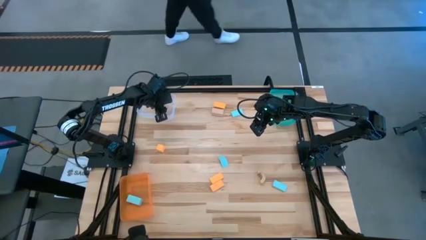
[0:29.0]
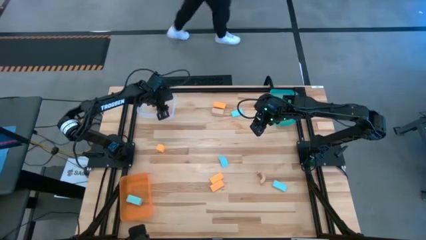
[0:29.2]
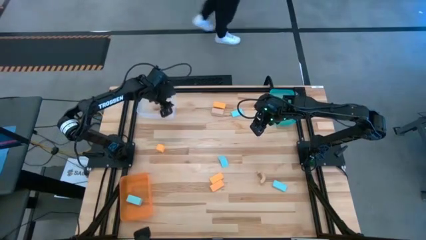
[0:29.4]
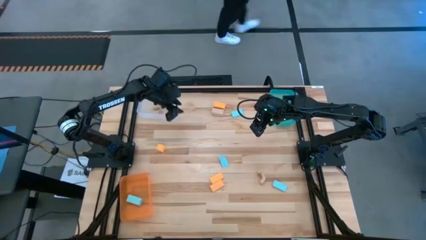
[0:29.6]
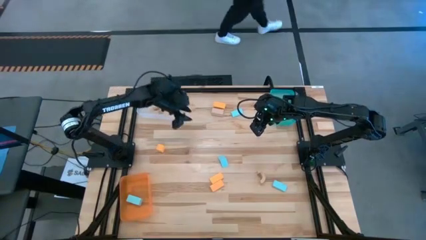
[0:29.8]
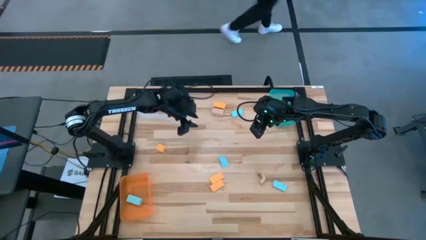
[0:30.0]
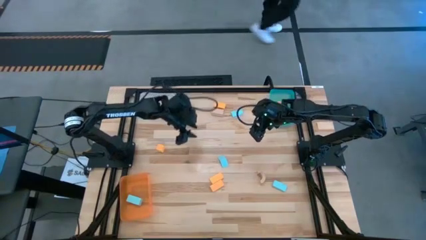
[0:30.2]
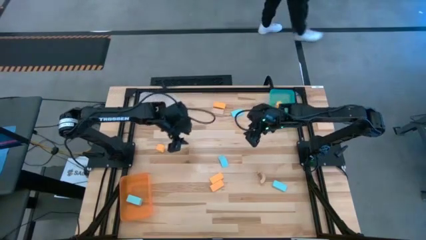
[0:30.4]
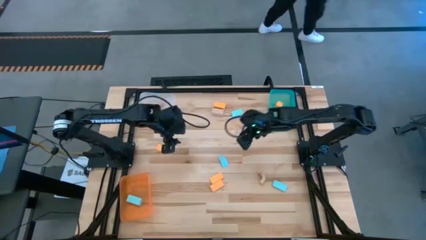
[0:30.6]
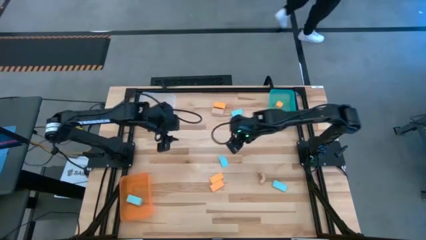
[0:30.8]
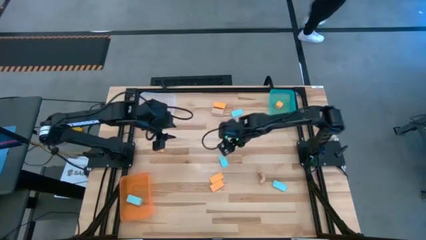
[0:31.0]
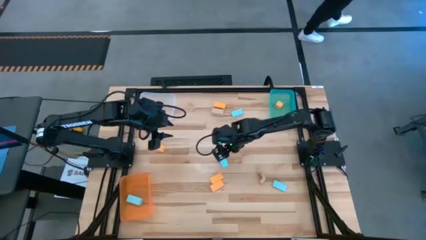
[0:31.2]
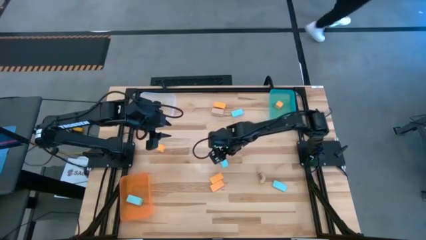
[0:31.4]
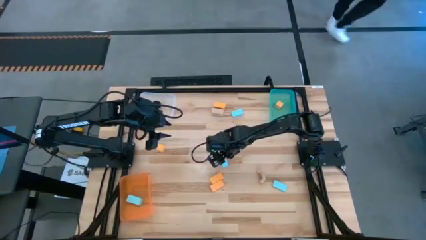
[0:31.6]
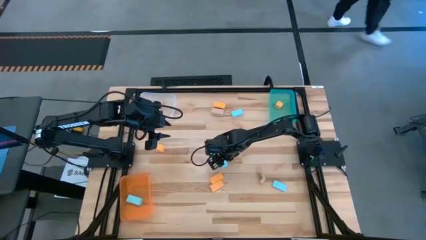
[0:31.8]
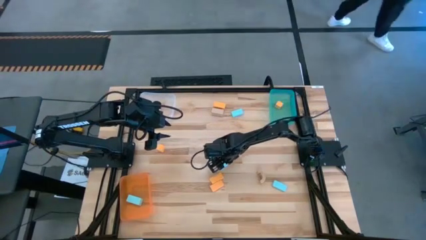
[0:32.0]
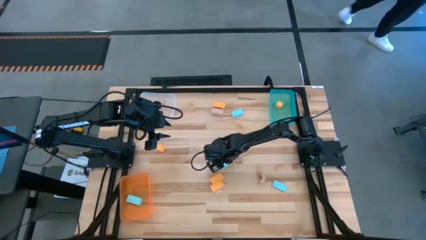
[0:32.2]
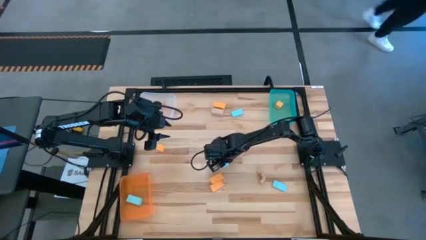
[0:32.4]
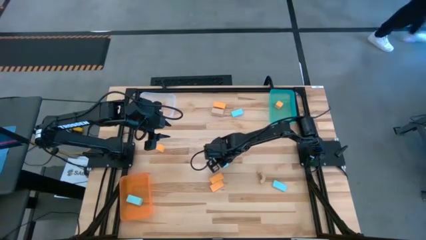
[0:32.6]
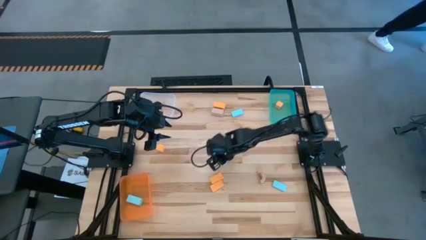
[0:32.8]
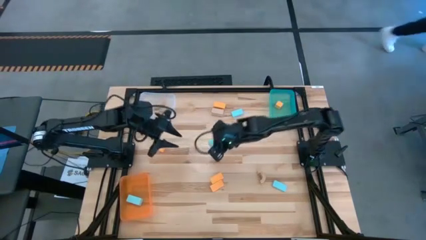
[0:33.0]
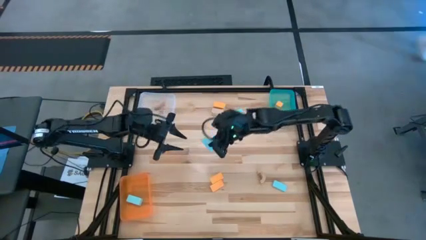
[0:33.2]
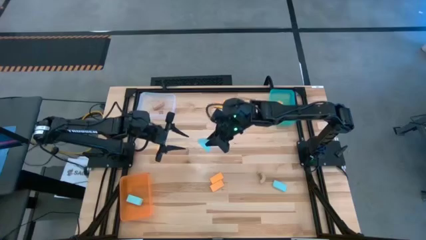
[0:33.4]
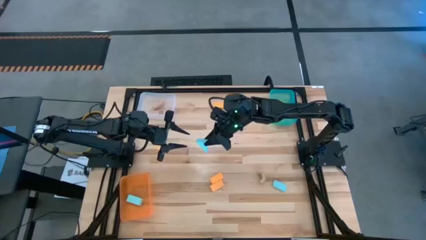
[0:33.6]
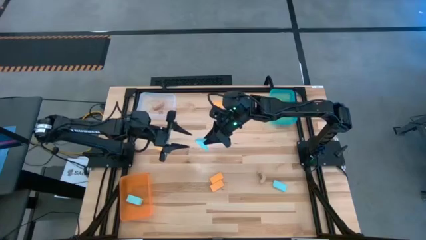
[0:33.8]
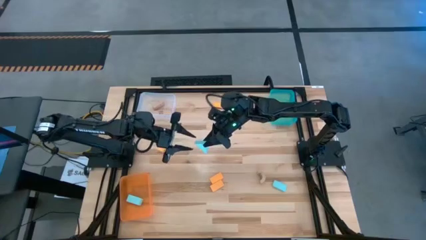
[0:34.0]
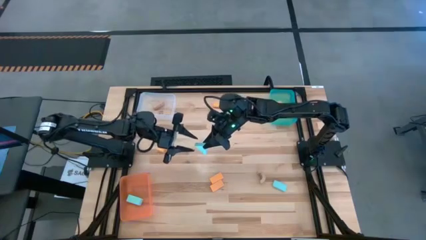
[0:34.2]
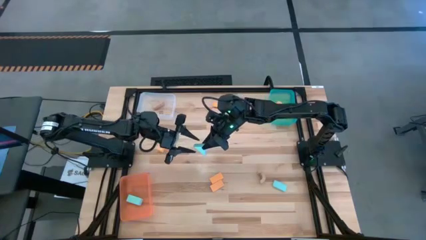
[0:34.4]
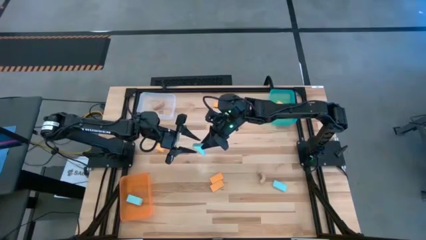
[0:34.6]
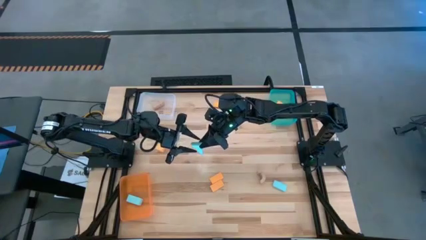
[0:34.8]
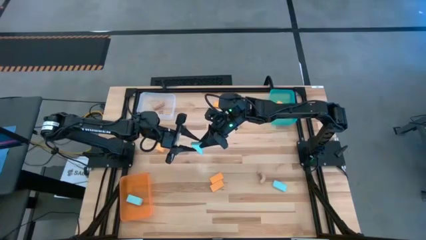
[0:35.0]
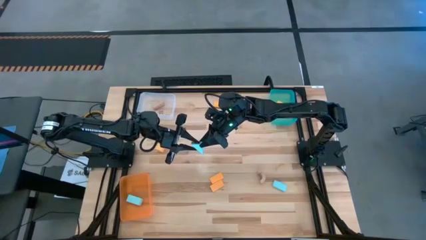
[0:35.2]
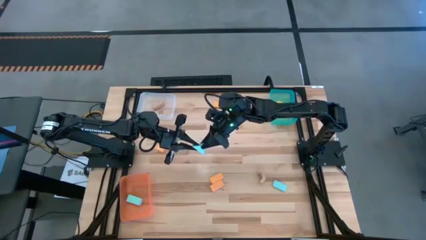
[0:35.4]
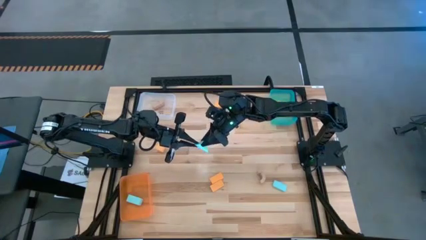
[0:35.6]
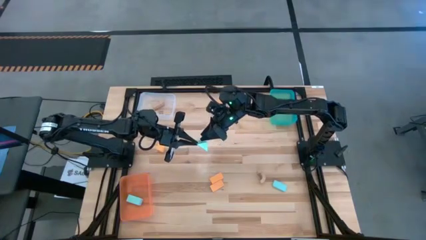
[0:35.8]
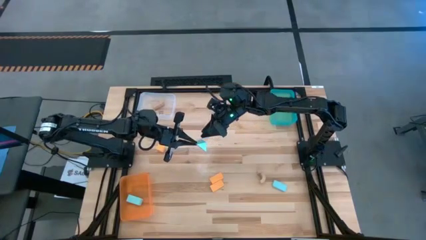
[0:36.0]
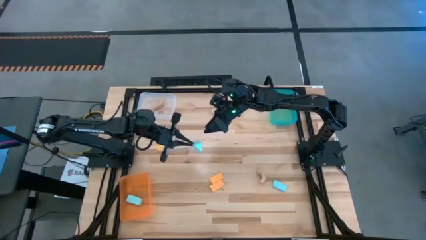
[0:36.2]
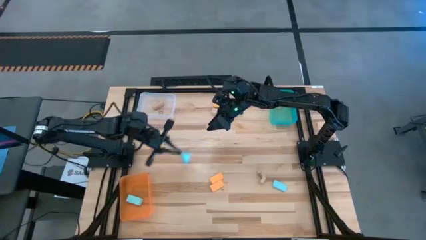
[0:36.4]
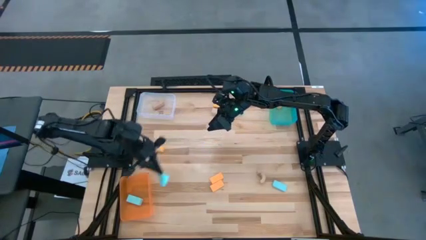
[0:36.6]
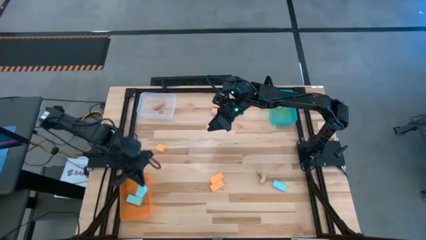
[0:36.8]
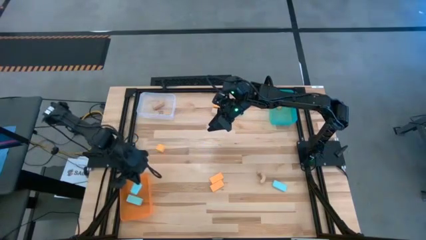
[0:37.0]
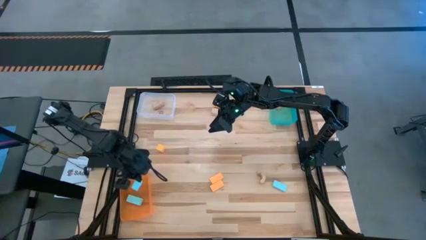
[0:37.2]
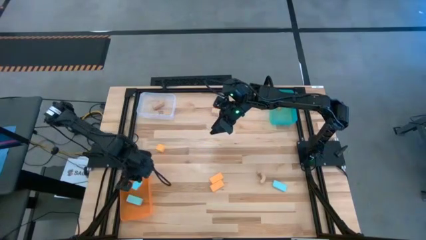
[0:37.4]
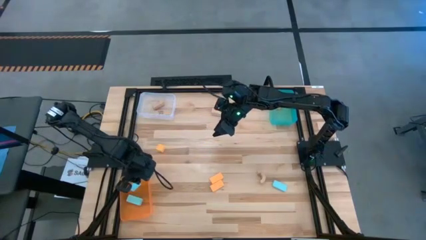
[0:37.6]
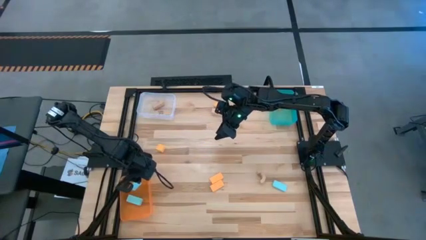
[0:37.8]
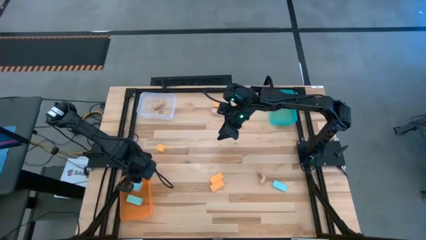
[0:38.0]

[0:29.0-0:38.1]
Task: Sort & place blocks by color
Put the light blue block into the orange bin

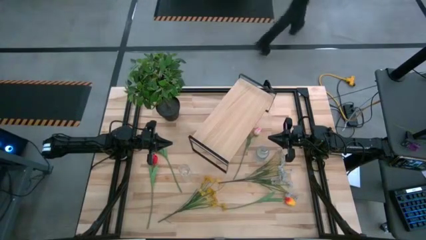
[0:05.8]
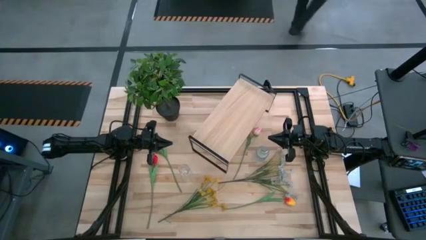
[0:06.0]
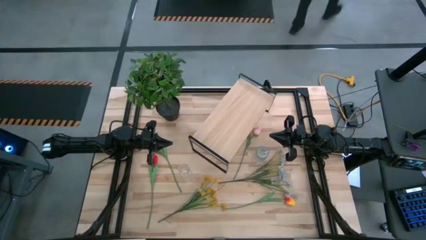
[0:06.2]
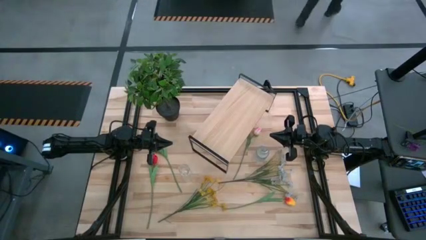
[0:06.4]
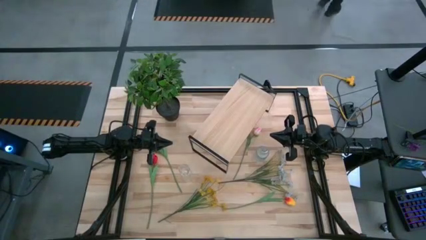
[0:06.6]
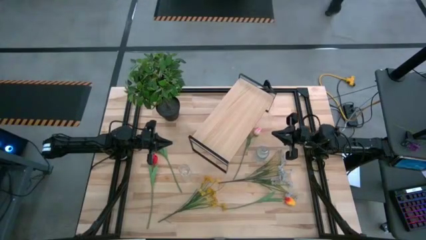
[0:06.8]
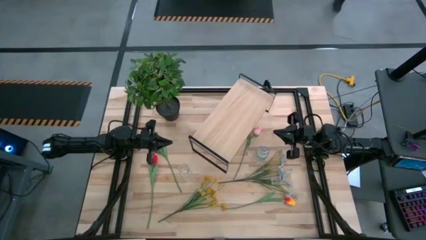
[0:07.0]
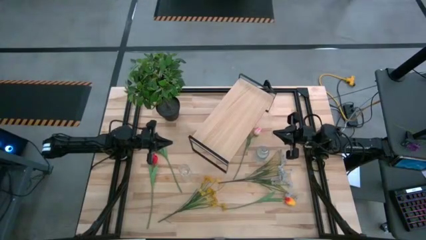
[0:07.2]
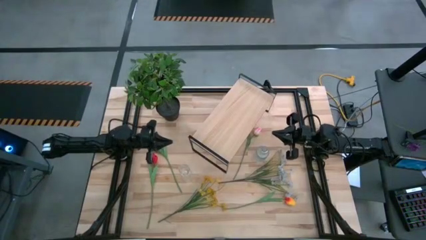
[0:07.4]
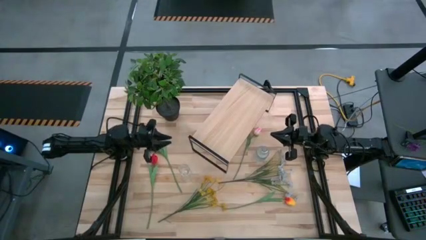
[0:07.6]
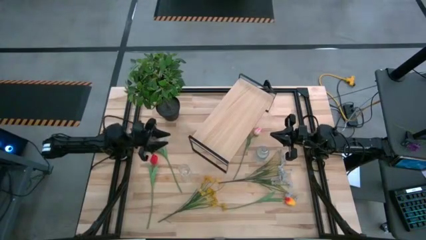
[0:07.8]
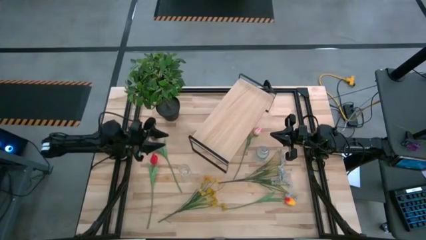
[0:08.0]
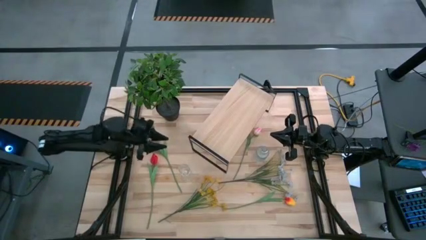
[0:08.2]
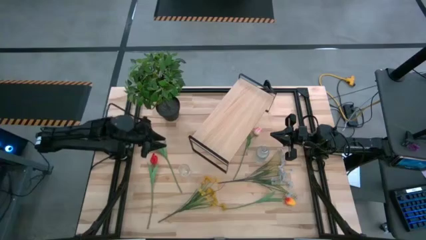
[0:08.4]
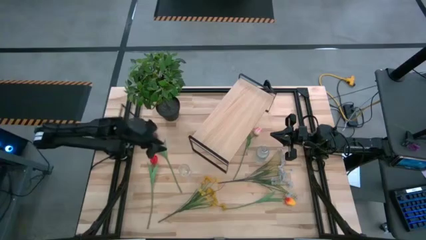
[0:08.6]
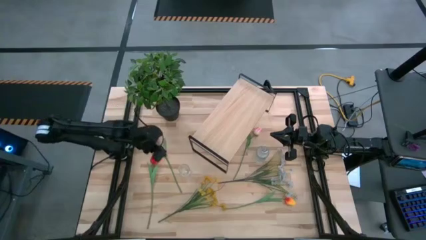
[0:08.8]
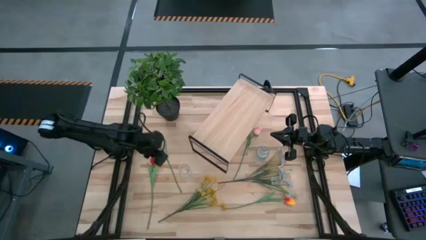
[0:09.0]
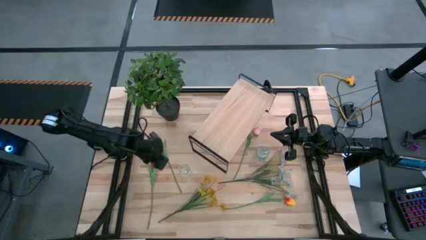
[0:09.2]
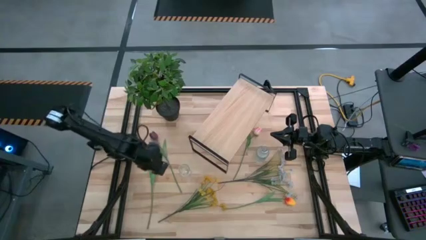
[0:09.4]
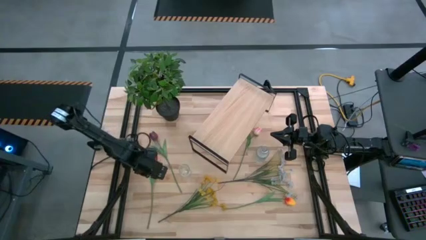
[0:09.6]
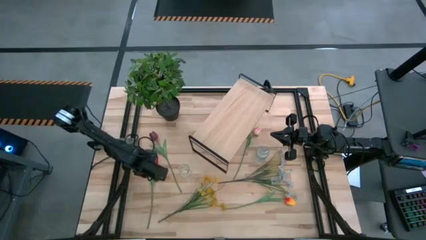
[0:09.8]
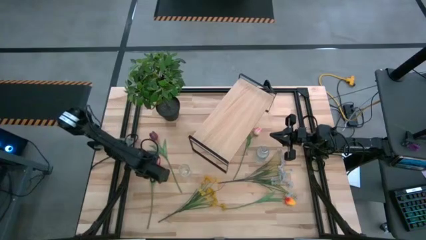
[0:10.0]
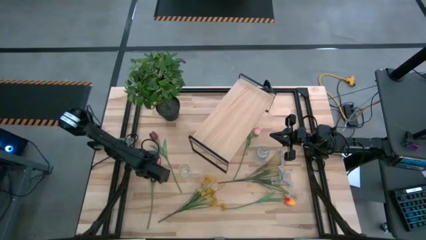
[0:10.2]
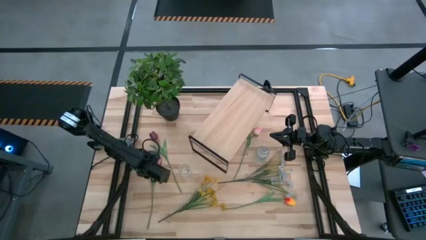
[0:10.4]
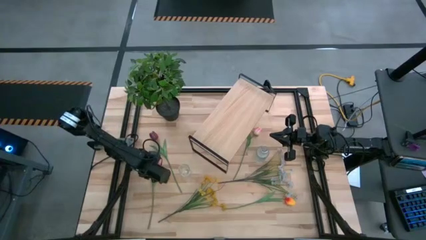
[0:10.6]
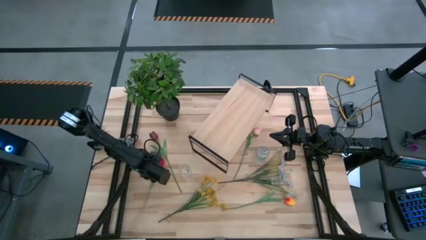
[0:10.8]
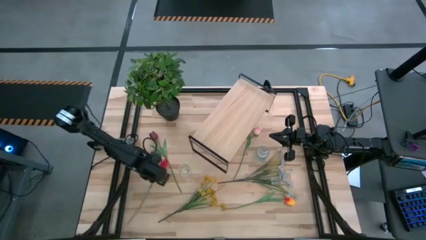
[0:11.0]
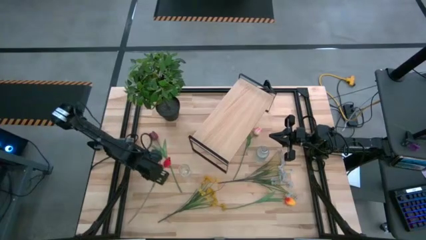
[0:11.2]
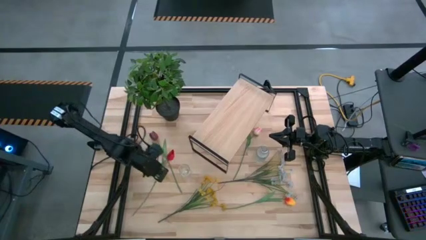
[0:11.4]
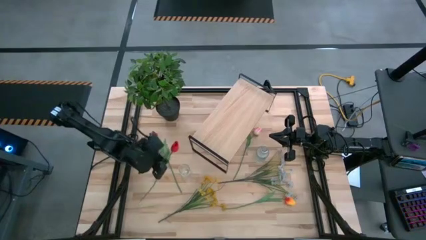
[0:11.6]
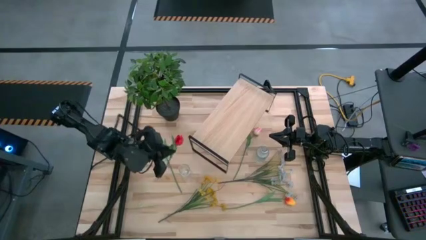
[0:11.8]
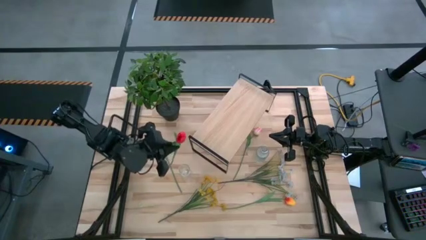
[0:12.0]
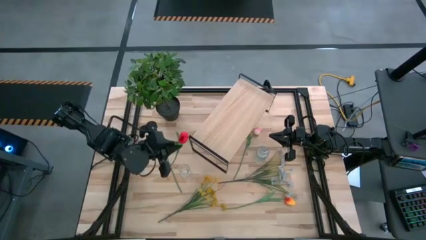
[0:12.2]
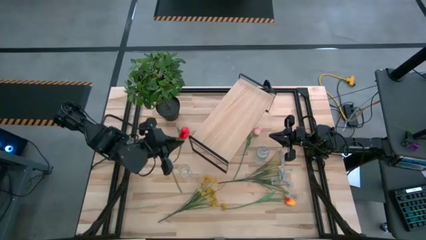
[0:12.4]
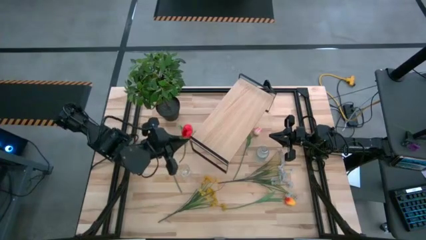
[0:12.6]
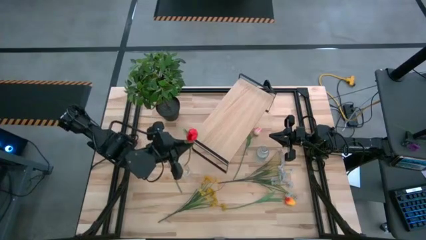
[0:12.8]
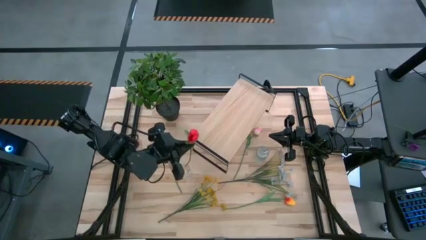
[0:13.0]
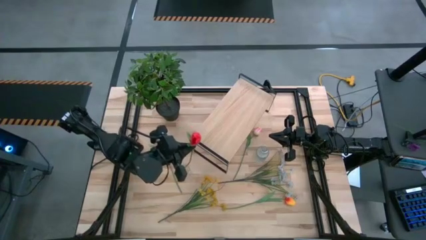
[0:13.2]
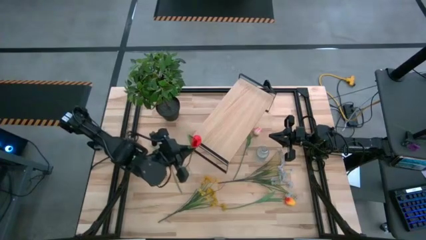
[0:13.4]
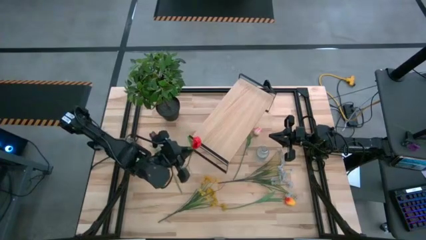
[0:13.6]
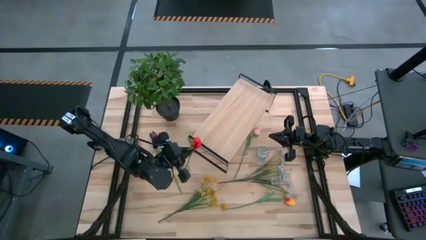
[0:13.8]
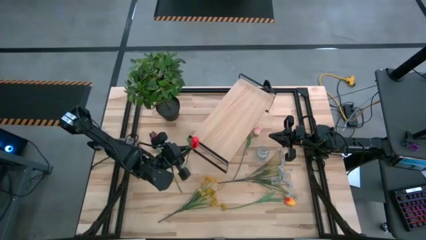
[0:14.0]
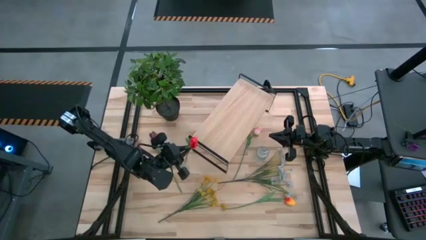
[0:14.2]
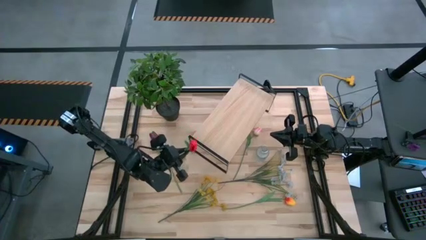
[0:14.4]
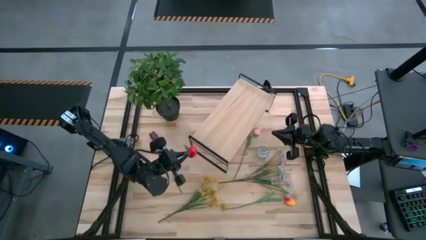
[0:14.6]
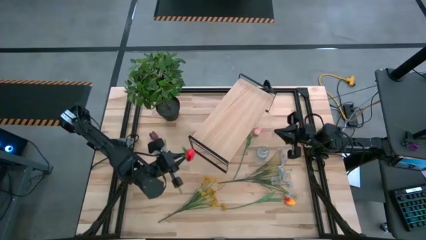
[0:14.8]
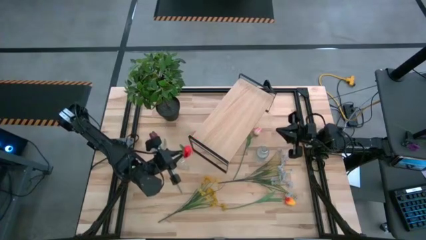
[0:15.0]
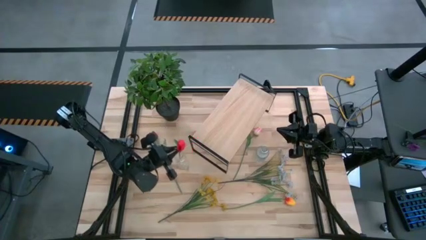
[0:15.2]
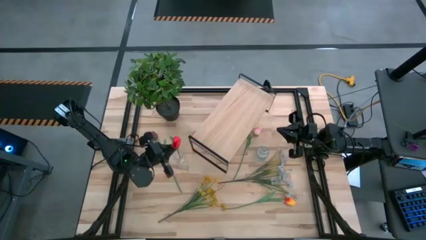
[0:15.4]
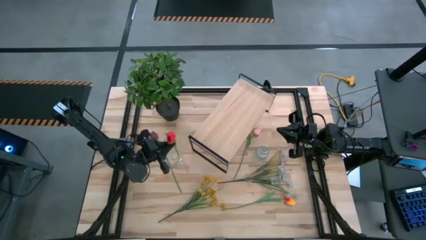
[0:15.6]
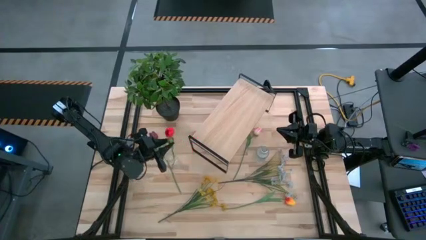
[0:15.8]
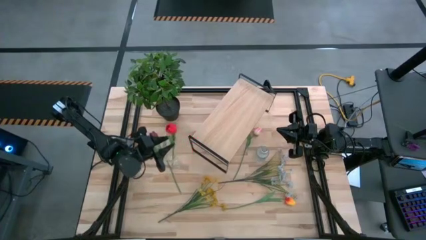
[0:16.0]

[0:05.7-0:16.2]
Task: Pick and place flowers into a vace then onto a shelf
Put the red flower into the left transparent vase
